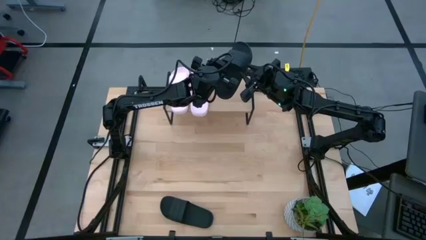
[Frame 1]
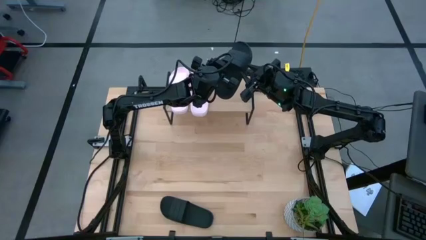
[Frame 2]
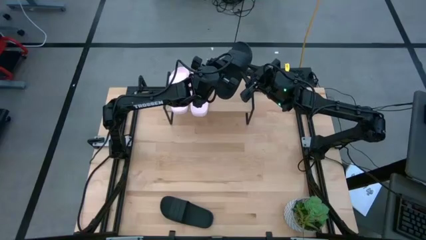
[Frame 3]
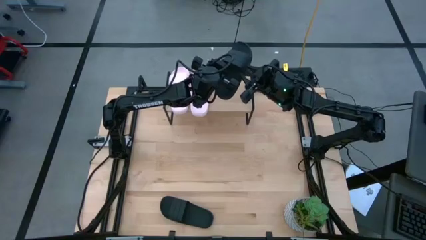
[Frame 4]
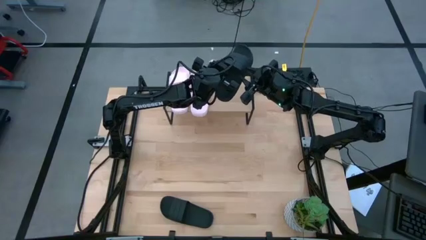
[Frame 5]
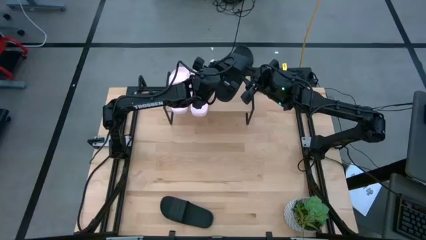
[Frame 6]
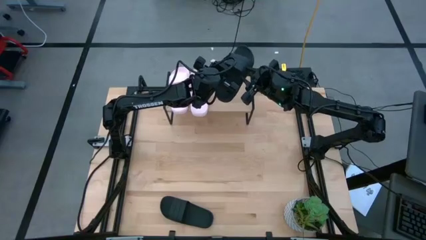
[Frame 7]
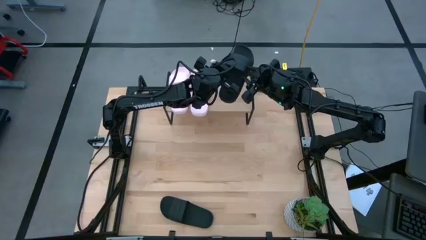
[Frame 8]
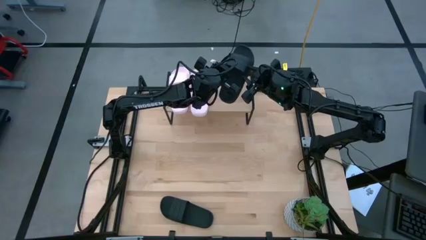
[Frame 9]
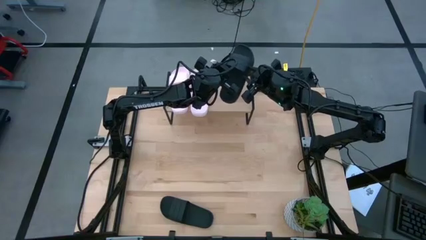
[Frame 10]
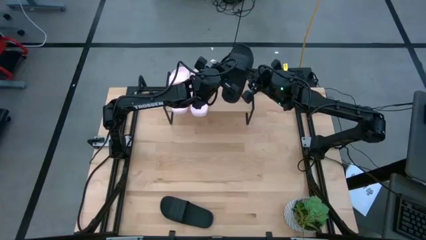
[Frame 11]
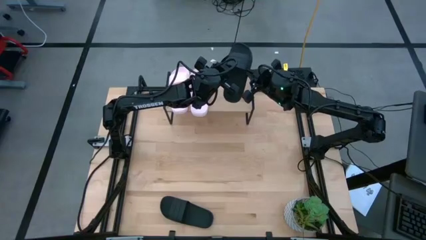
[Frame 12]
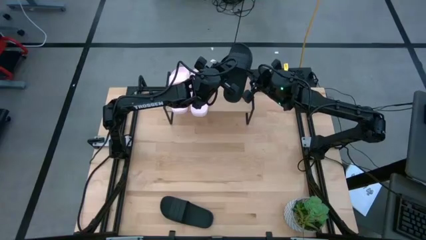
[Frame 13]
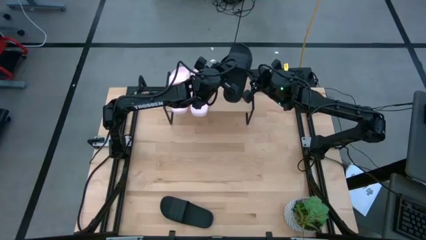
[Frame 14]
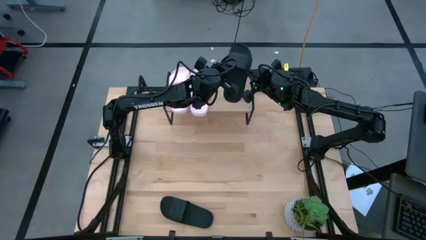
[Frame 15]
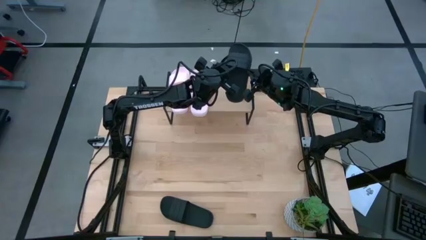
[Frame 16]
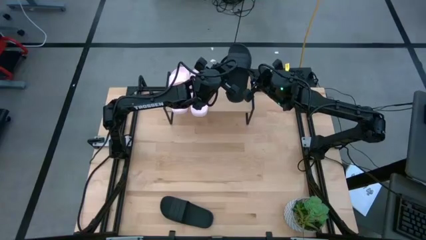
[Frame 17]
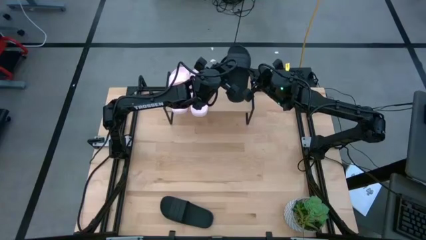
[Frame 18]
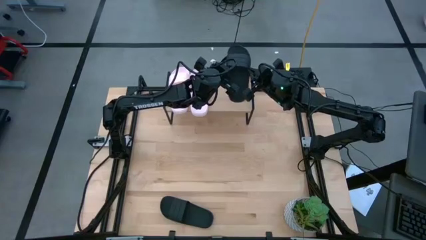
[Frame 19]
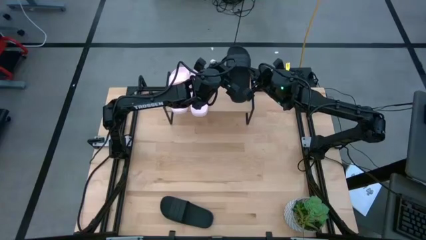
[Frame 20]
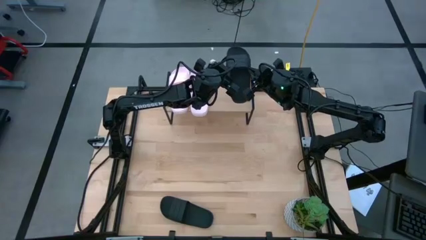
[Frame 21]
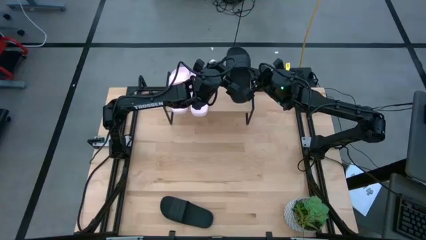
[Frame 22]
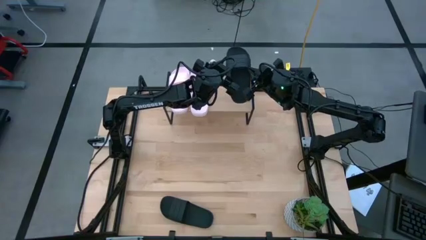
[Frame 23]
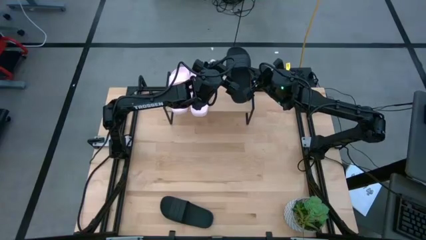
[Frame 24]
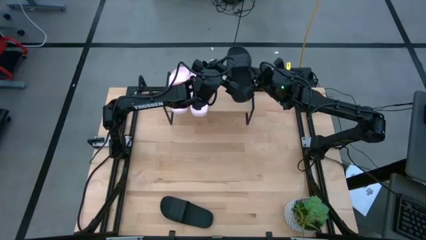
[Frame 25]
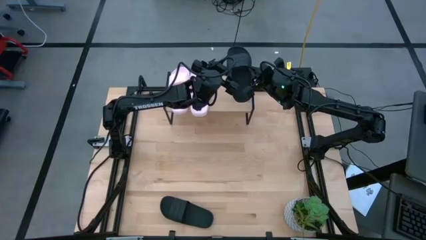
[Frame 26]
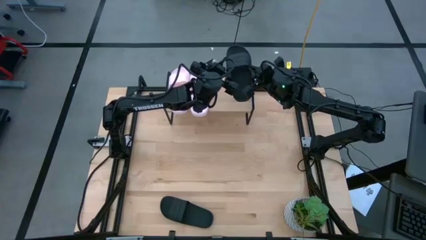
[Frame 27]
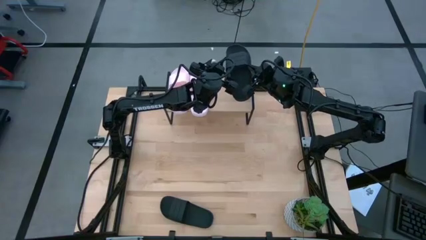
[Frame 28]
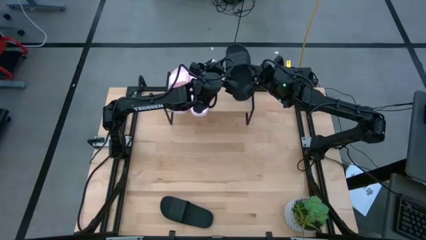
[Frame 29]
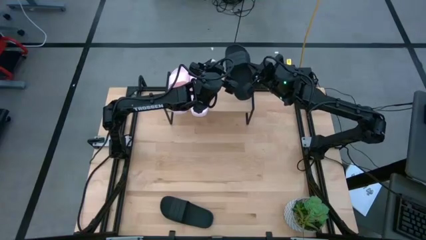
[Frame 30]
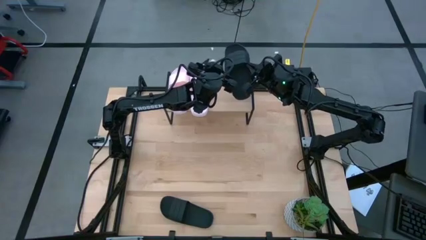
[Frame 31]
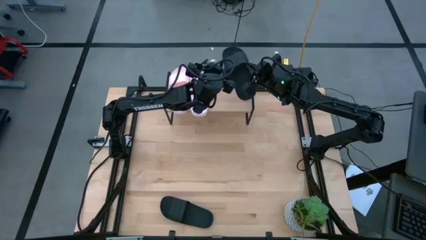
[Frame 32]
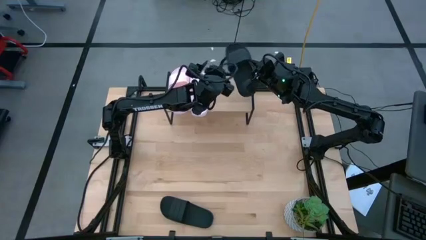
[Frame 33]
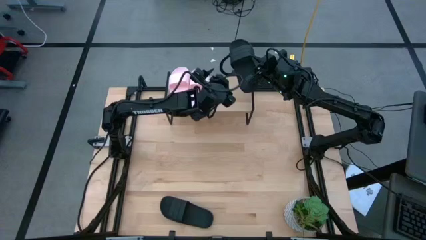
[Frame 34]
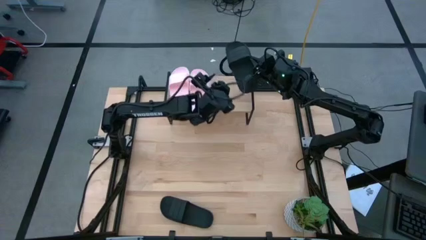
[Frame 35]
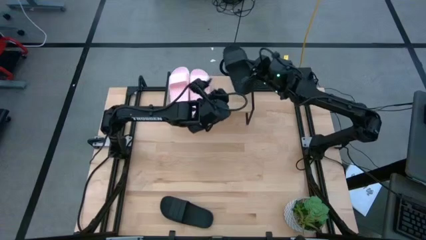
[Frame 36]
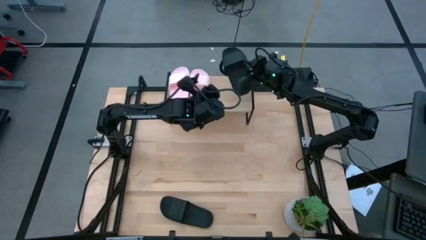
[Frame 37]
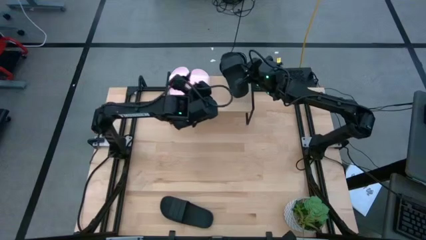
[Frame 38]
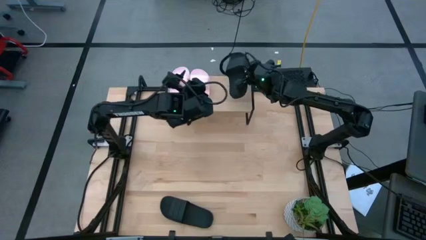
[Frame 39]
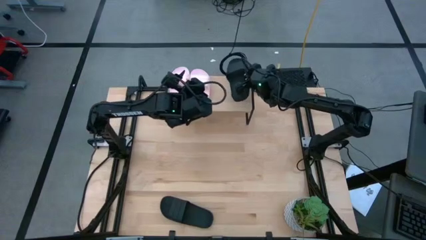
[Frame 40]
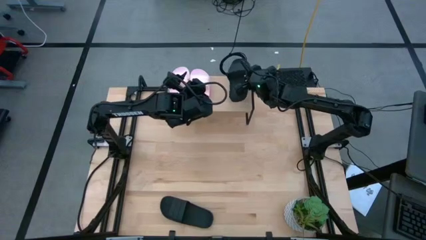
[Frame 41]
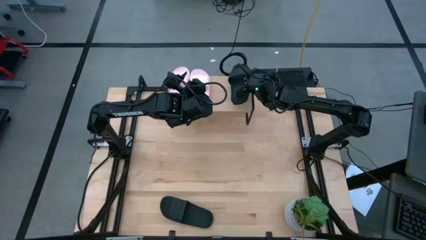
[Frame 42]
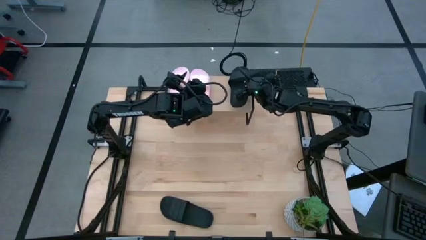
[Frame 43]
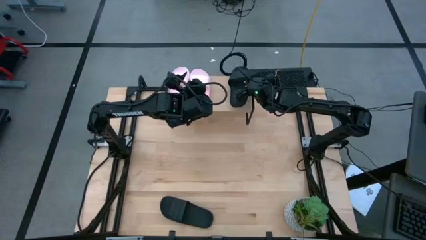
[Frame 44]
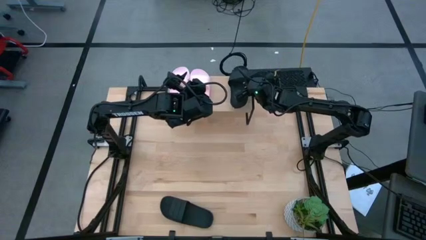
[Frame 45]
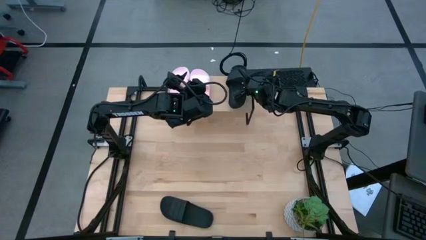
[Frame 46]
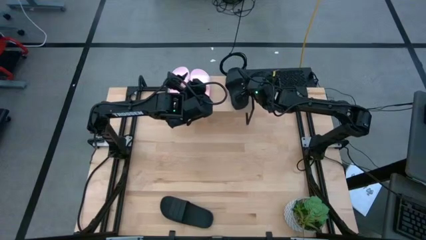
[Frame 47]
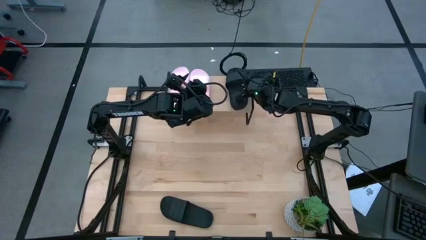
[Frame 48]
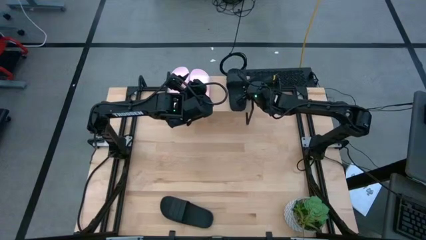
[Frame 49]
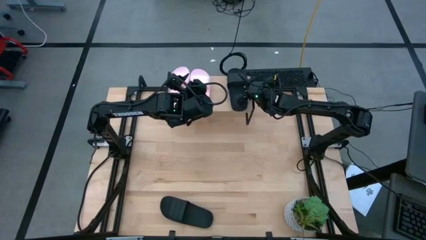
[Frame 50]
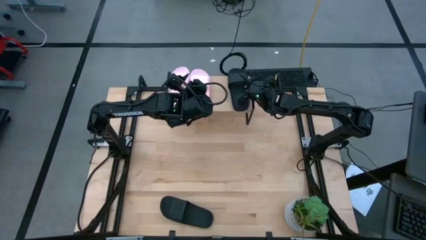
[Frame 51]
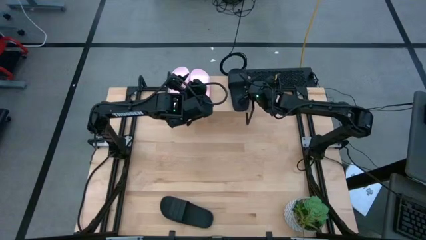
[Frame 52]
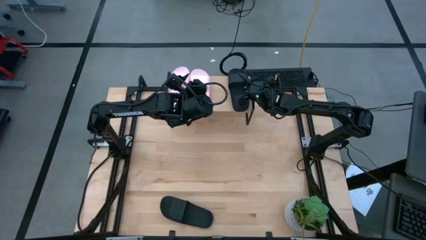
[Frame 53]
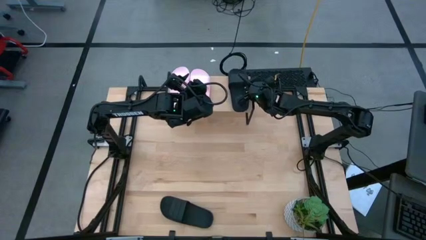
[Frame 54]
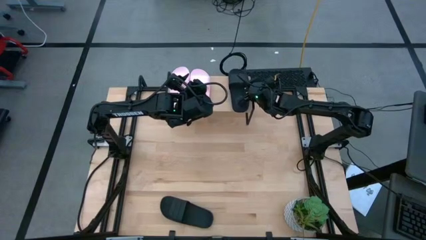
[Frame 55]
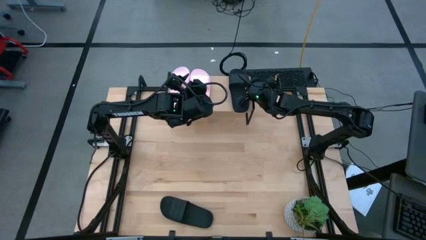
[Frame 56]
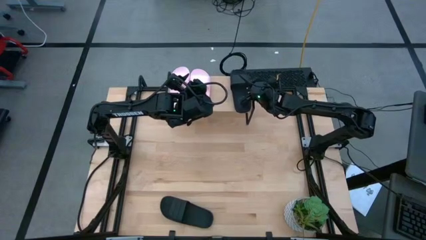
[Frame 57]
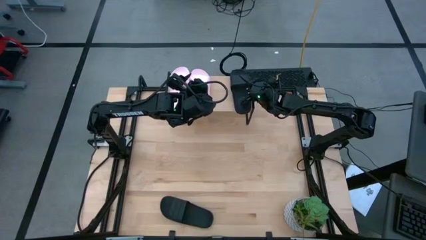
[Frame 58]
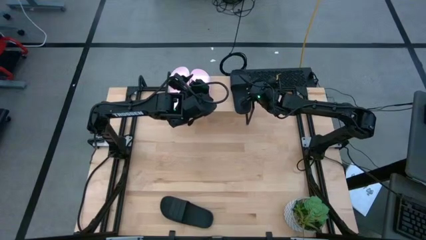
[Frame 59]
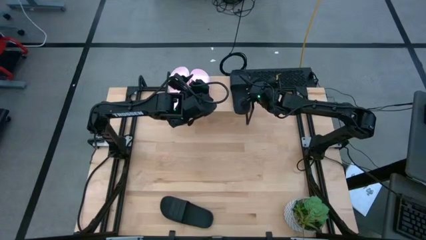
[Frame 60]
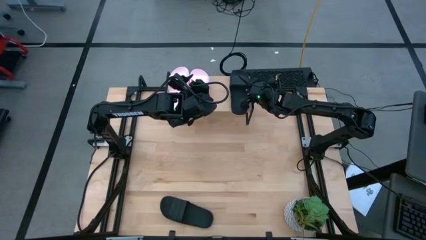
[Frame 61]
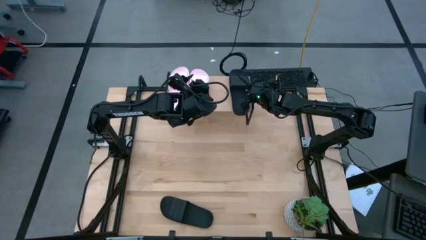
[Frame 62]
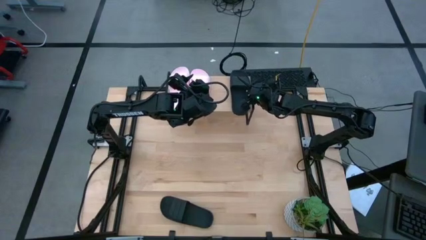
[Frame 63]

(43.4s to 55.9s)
Task: Pick and place slides into the shelf
Put the right black slide on the shelf
